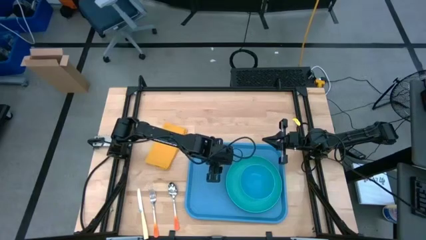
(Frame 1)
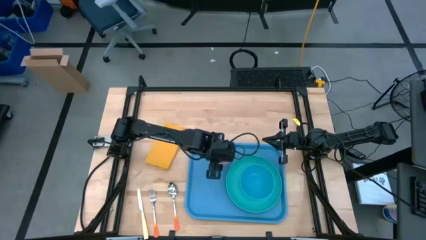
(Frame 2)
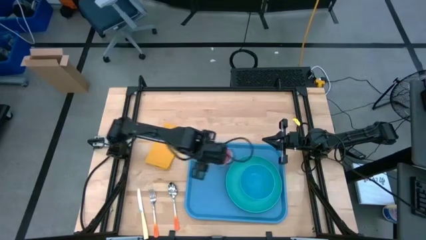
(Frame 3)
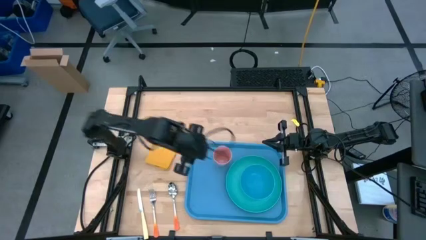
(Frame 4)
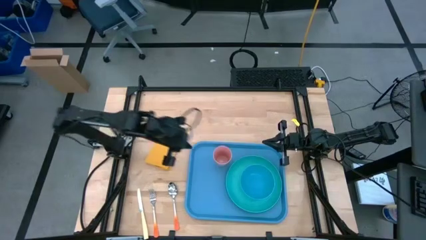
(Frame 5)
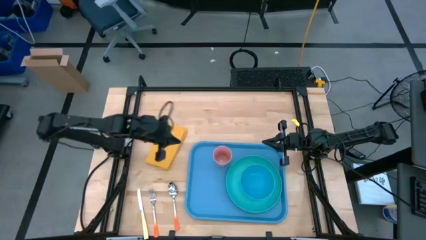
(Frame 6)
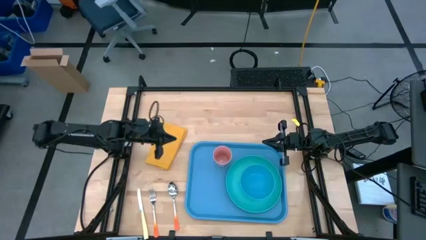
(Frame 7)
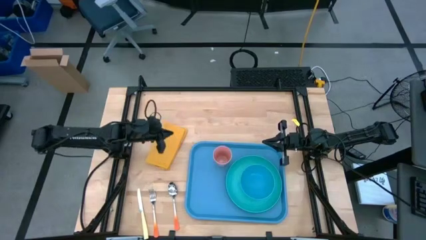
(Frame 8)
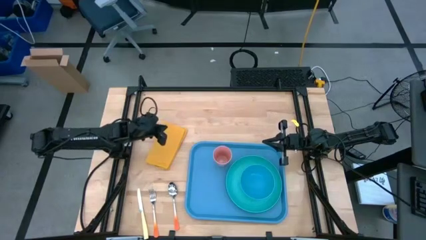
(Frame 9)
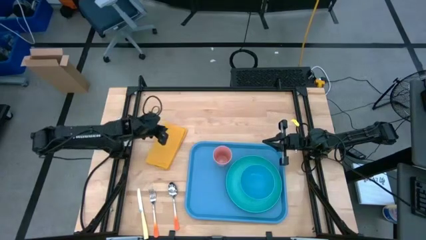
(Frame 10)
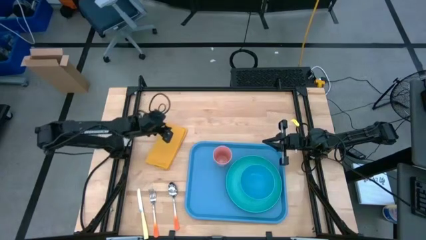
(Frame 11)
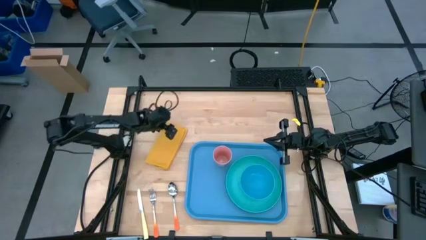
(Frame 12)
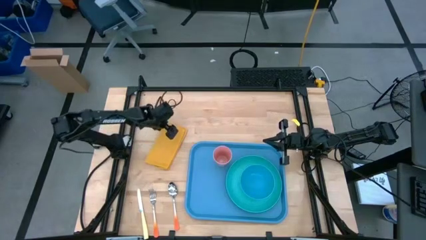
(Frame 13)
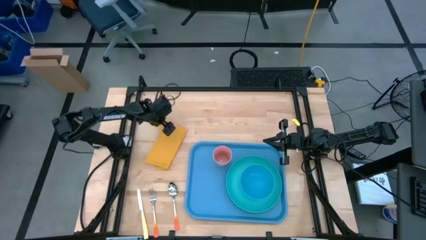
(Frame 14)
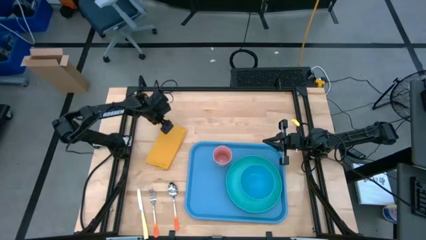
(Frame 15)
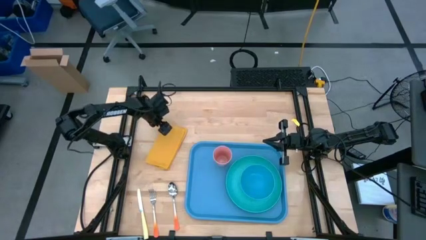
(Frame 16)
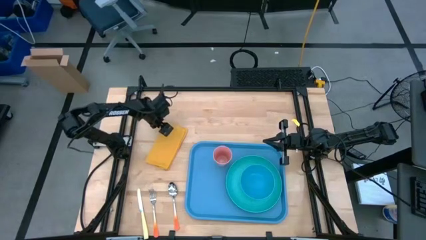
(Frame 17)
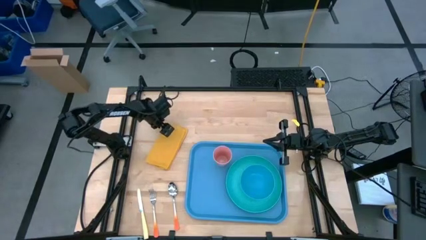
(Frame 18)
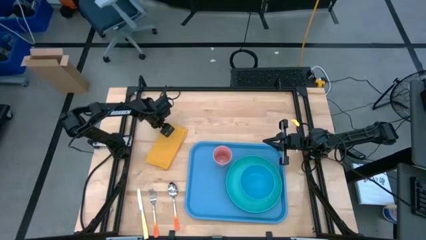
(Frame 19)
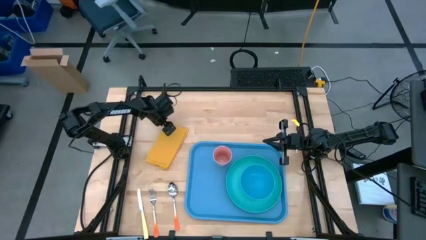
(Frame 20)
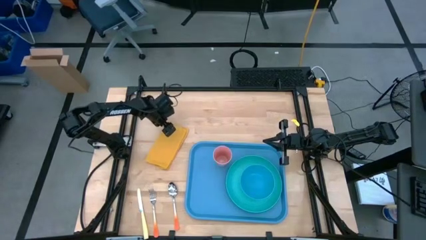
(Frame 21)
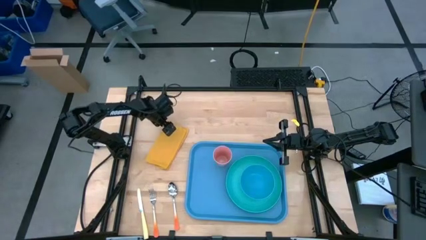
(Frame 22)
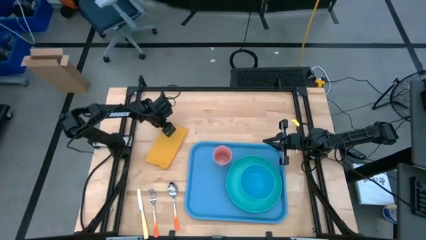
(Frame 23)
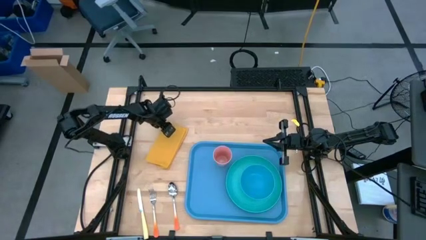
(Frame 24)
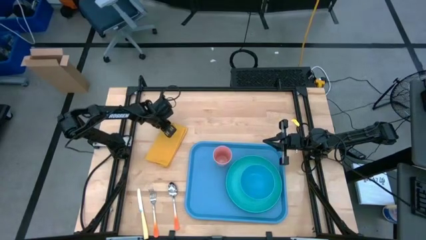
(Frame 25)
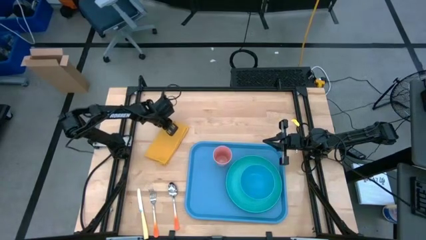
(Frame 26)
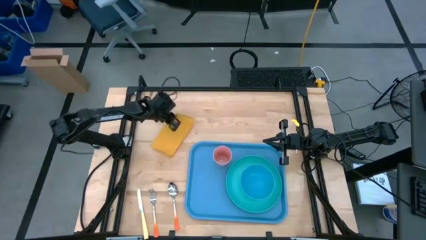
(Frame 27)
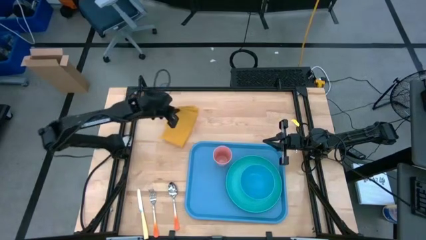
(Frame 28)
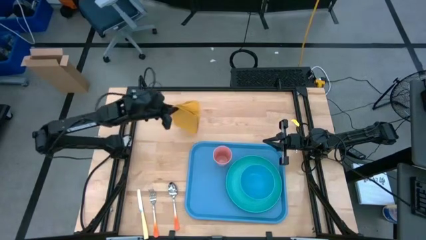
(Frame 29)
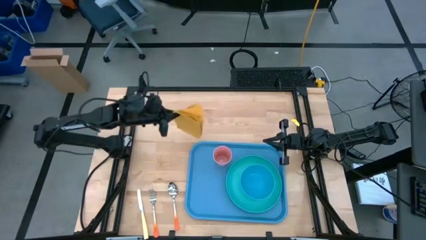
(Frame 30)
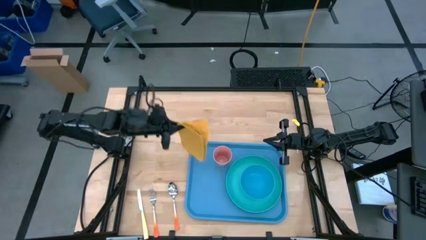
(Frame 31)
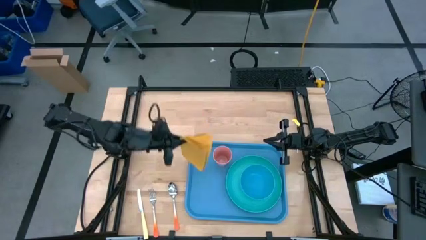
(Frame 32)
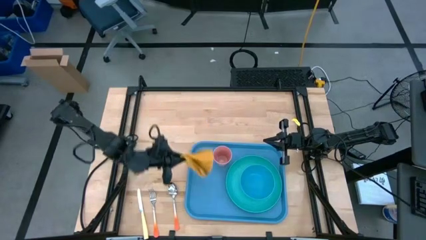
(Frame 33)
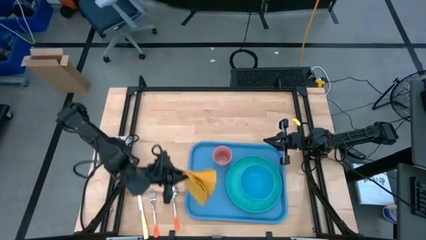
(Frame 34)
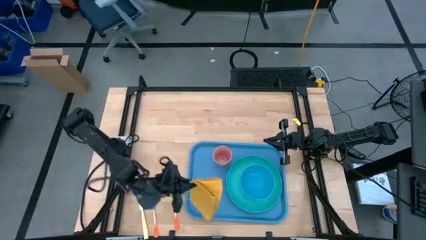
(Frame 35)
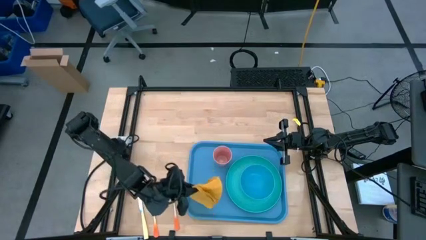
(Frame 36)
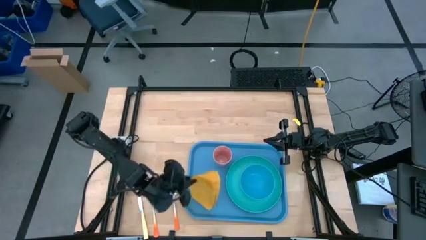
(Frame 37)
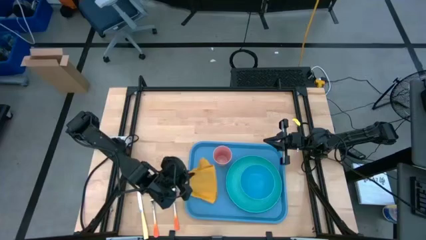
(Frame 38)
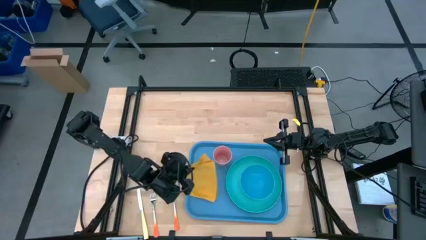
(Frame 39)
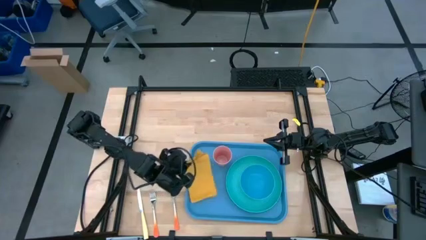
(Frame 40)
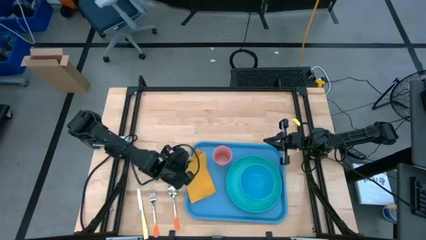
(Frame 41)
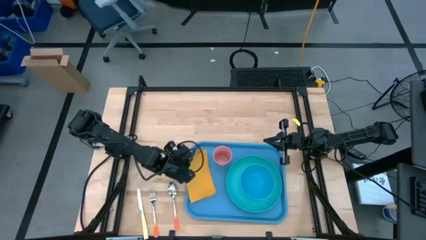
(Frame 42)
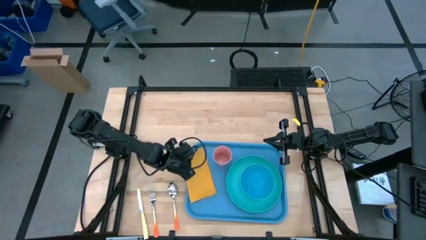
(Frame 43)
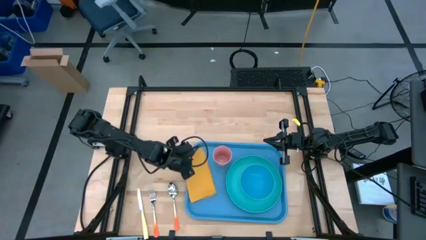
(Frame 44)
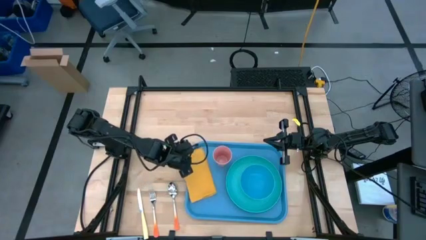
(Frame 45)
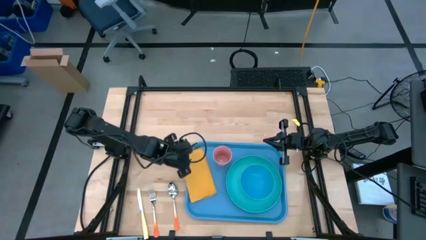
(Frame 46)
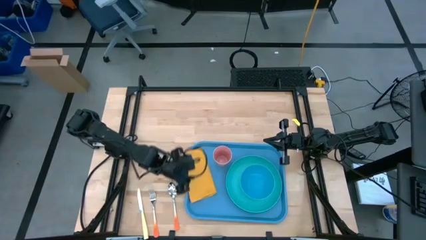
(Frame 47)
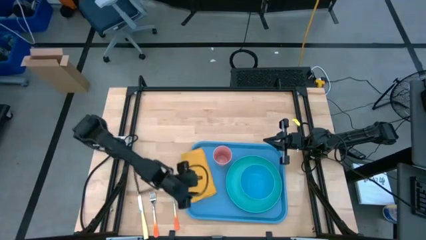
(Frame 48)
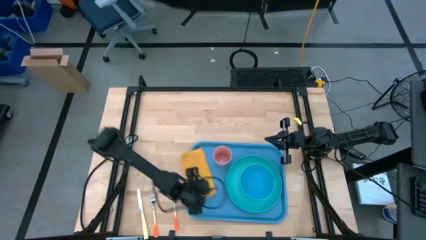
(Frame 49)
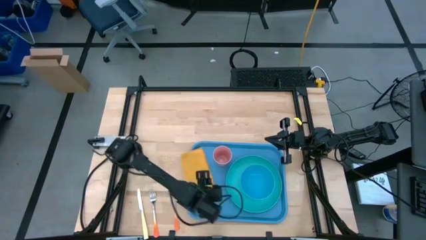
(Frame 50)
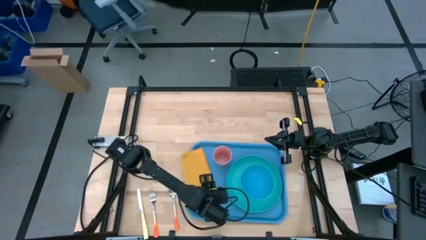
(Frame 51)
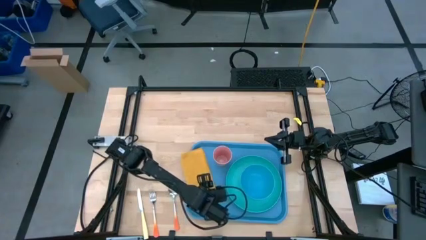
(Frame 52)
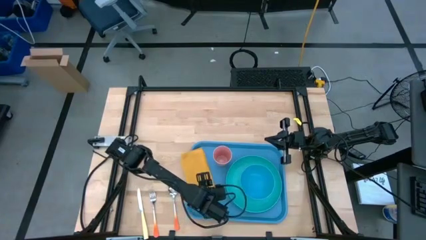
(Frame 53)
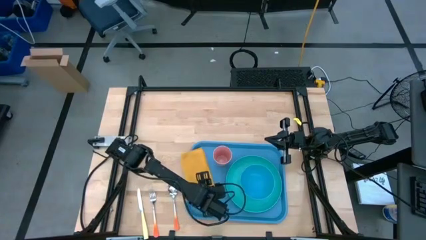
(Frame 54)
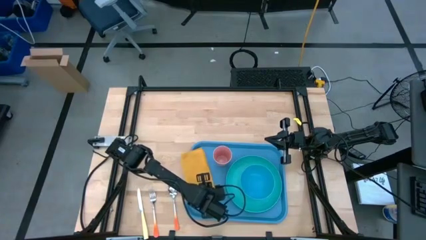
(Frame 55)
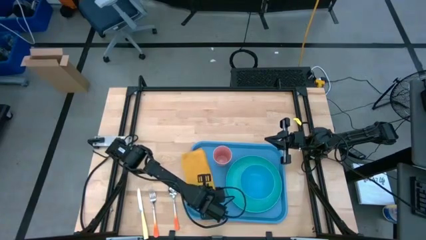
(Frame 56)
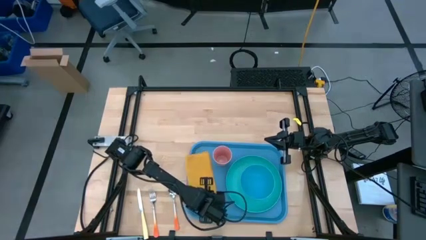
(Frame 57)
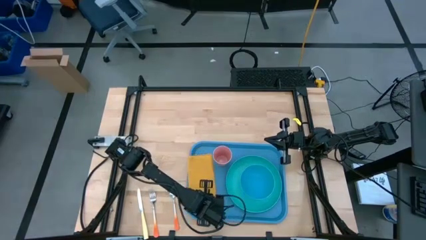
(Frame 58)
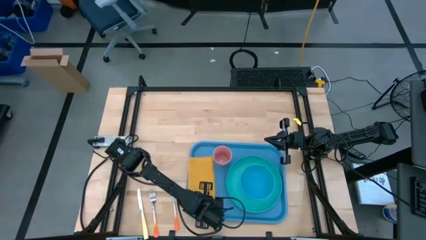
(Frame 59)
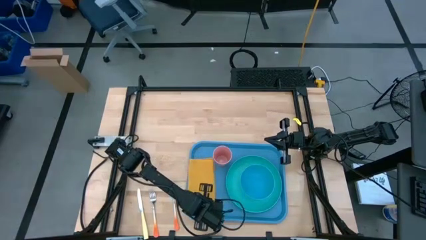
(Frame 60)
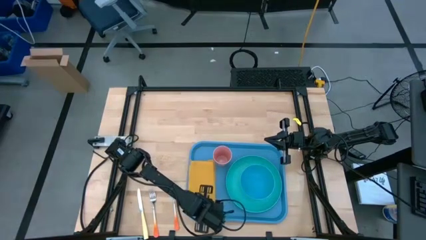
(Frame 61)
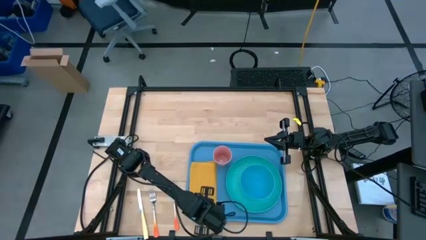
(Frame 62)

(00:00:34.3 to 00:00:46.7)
Task: Set up tray
Put the yellow napkin on the left of the blue tray
